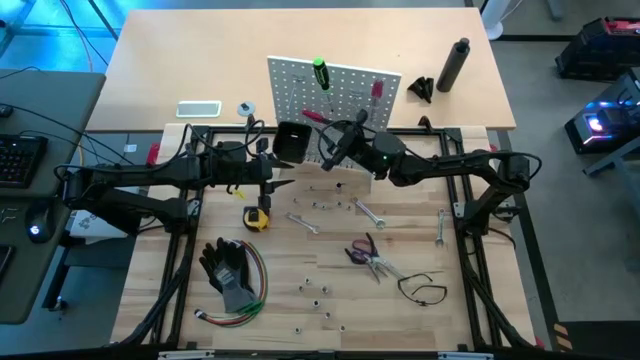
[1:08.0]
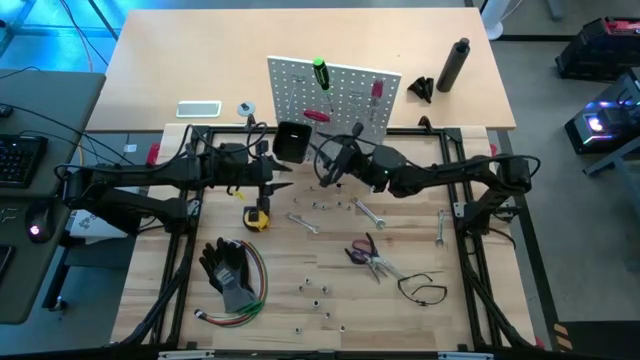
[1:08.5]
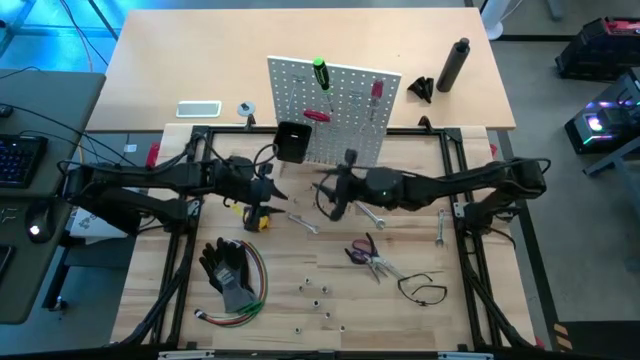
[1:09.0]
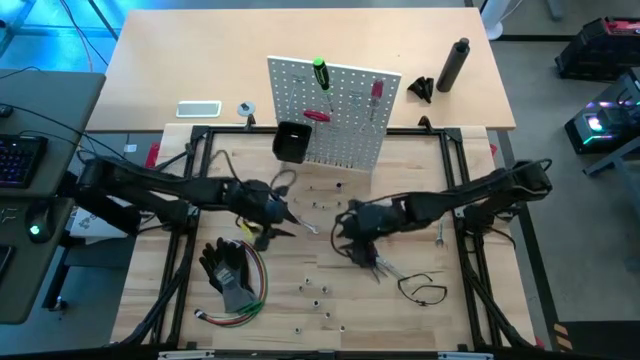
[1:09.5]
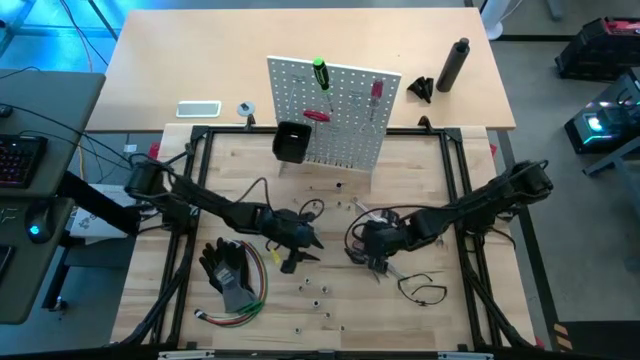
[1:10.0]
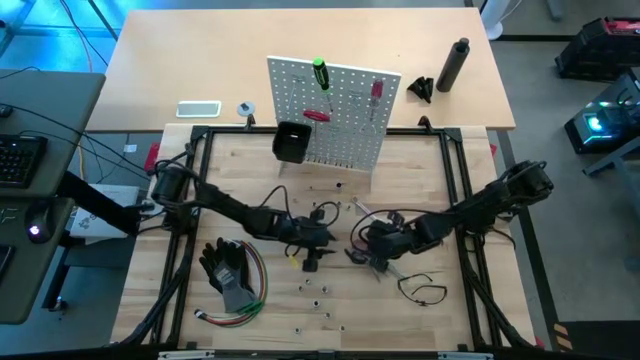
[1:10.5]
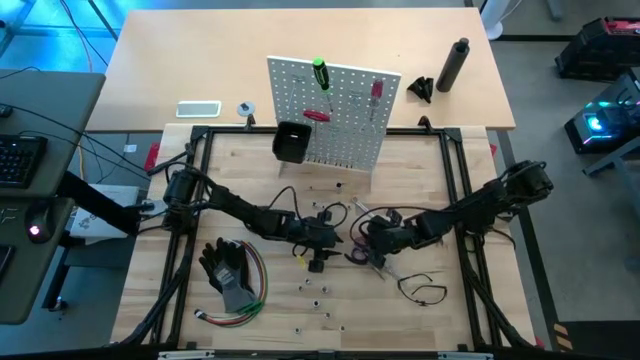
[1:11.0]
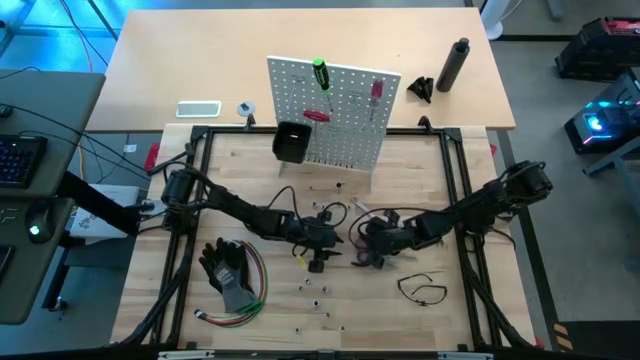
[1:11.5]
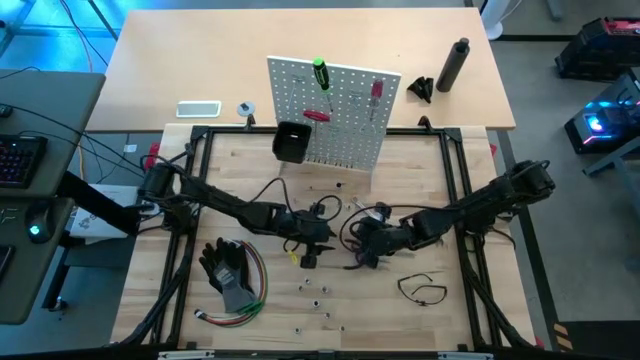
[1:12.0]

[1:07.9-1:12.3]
Task: Hang tools onto peg board
Hang the black pliers on the white peg board

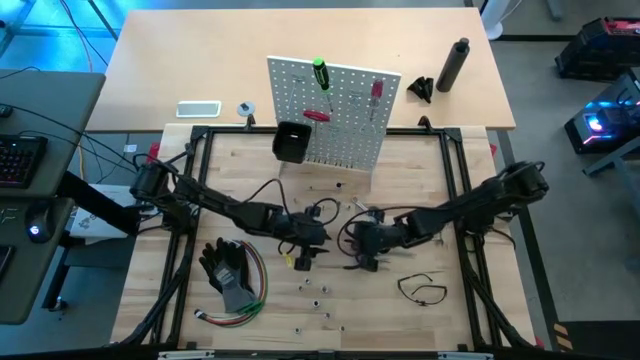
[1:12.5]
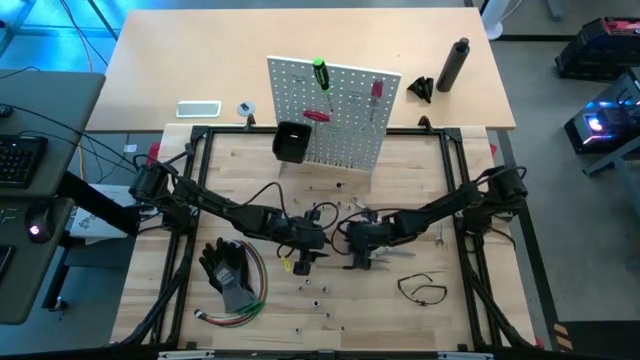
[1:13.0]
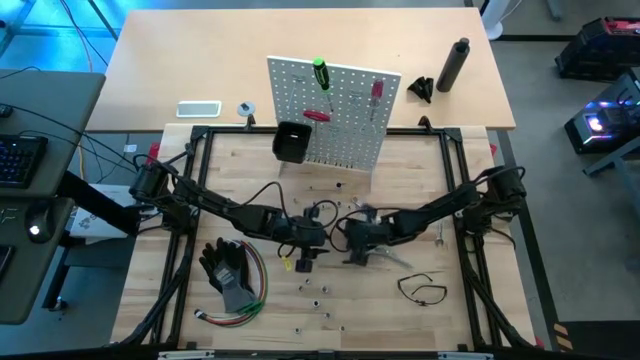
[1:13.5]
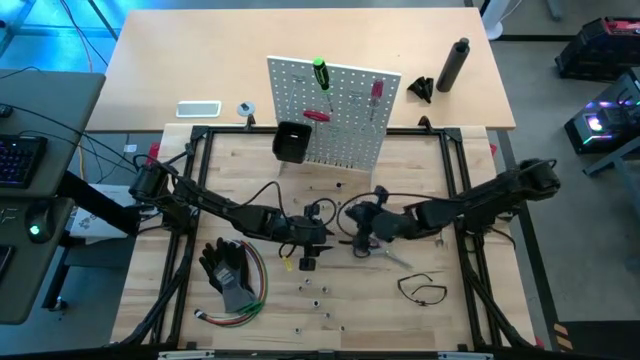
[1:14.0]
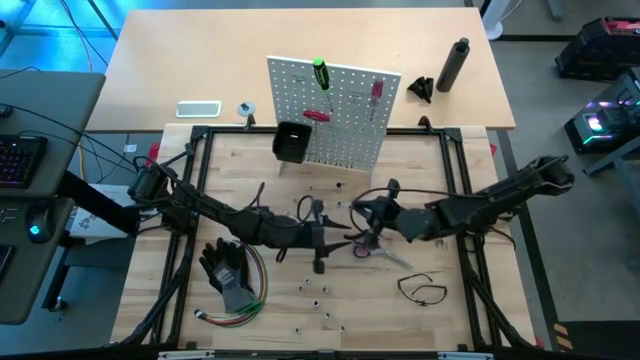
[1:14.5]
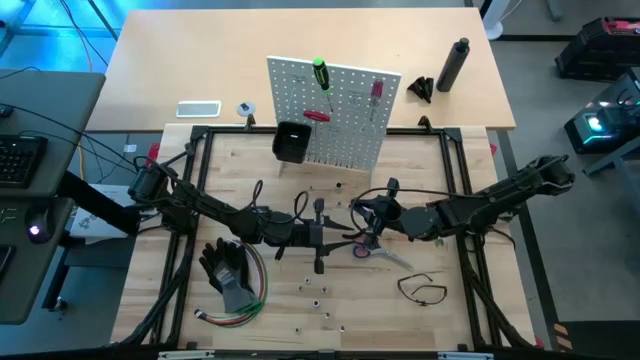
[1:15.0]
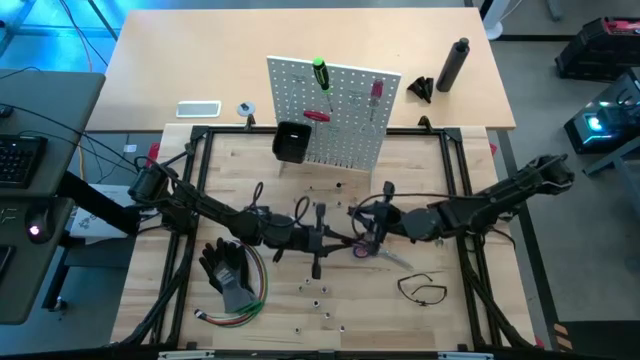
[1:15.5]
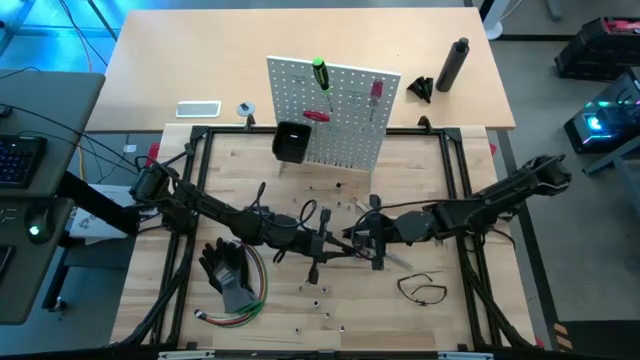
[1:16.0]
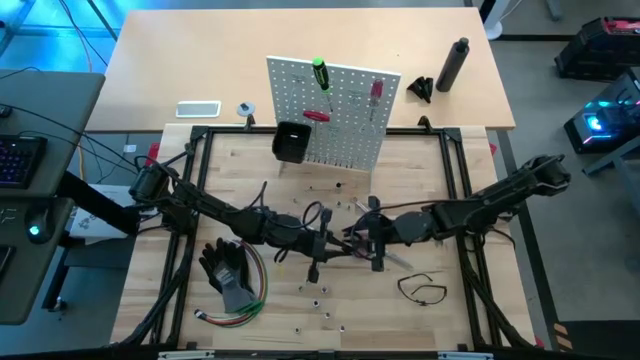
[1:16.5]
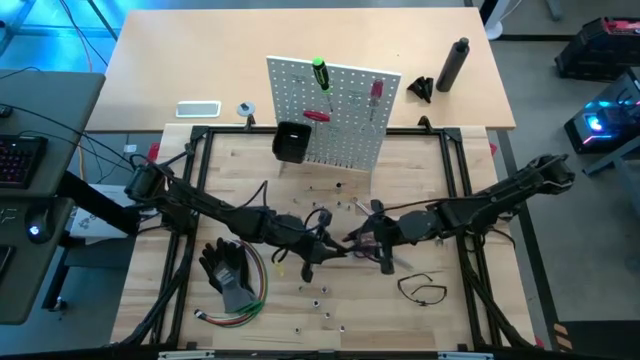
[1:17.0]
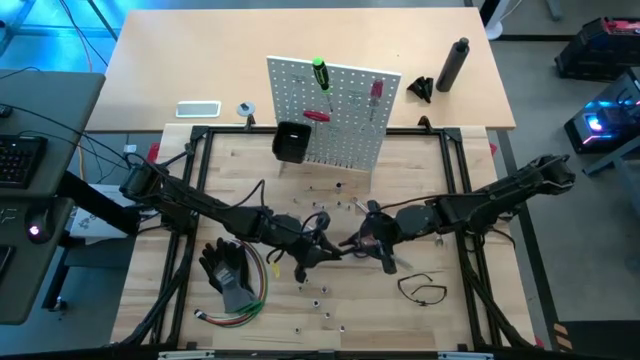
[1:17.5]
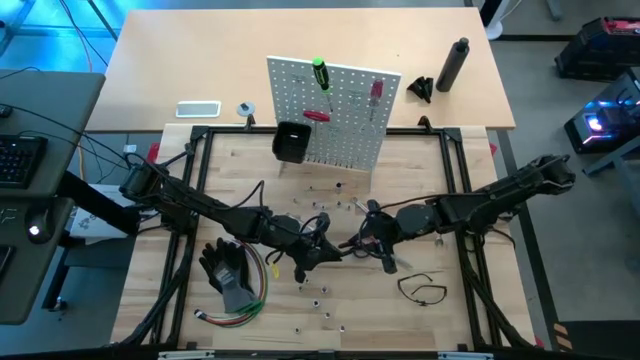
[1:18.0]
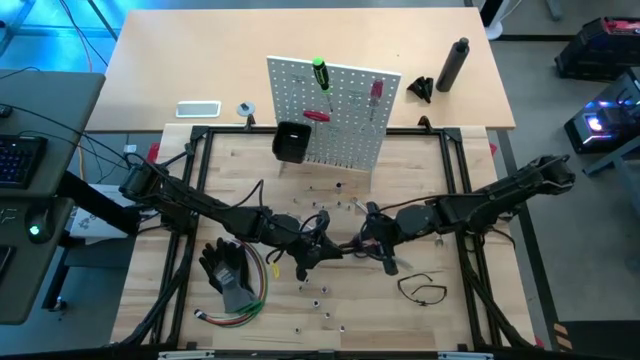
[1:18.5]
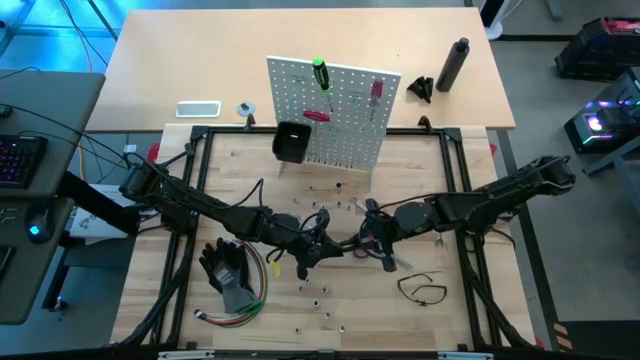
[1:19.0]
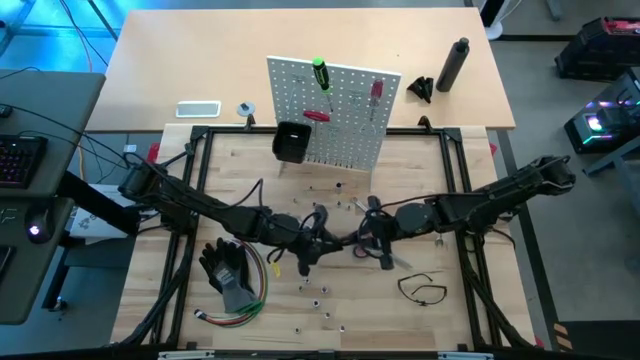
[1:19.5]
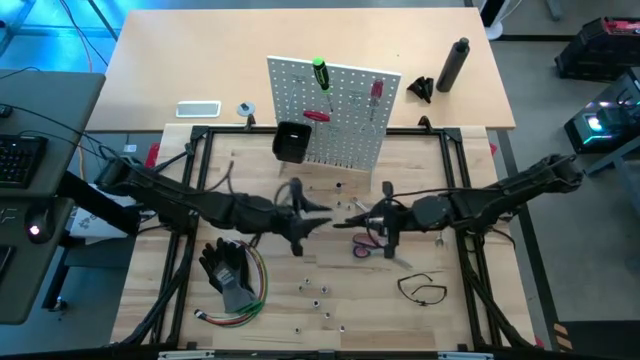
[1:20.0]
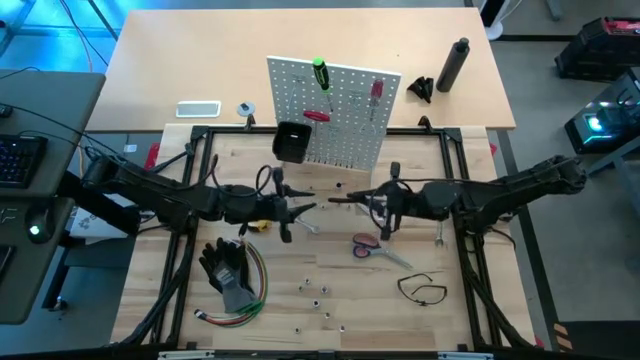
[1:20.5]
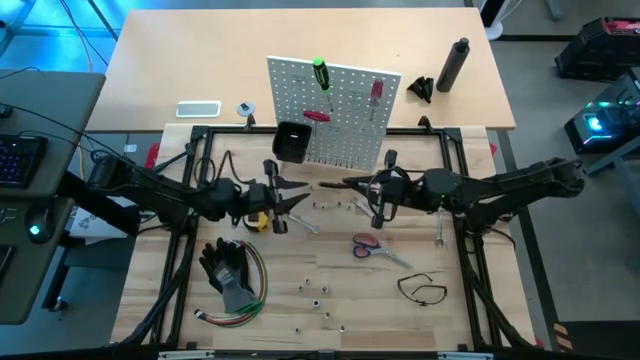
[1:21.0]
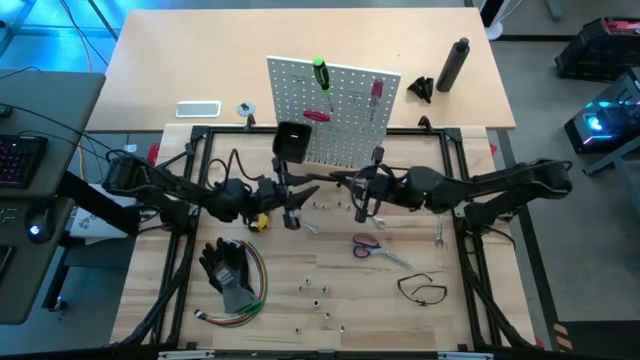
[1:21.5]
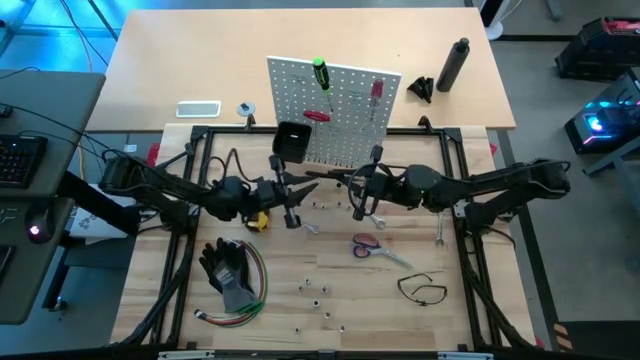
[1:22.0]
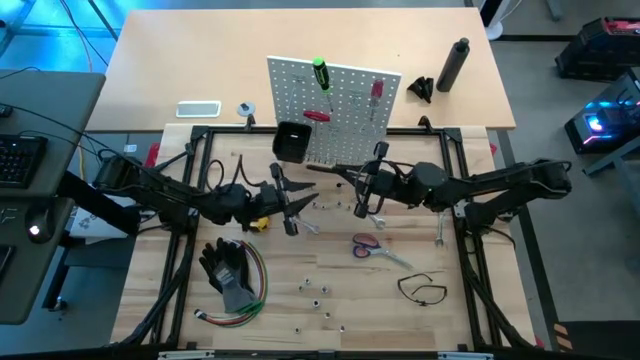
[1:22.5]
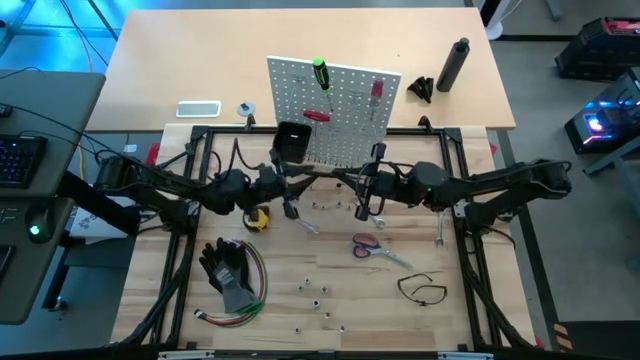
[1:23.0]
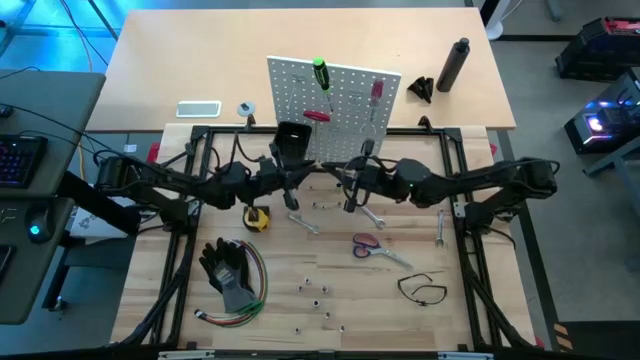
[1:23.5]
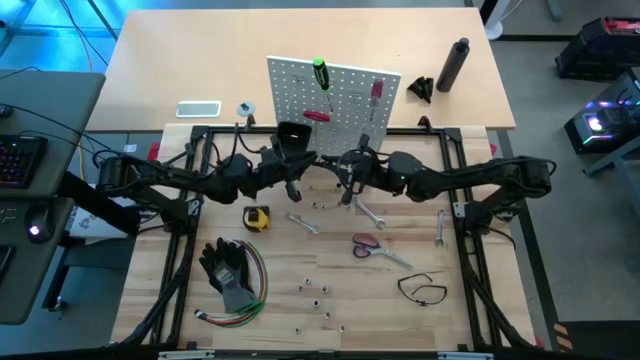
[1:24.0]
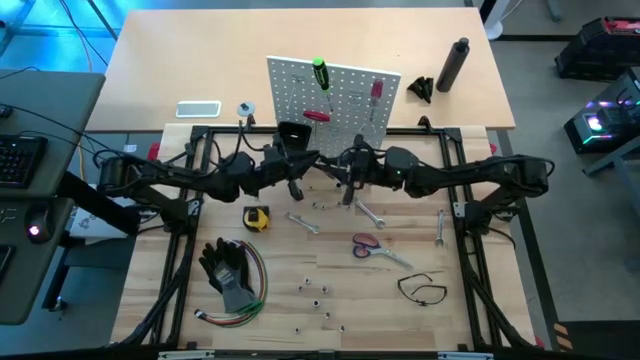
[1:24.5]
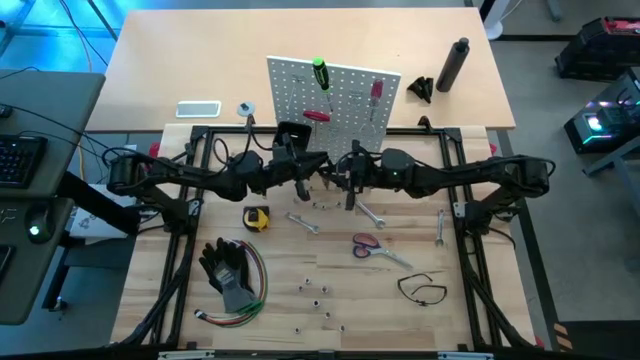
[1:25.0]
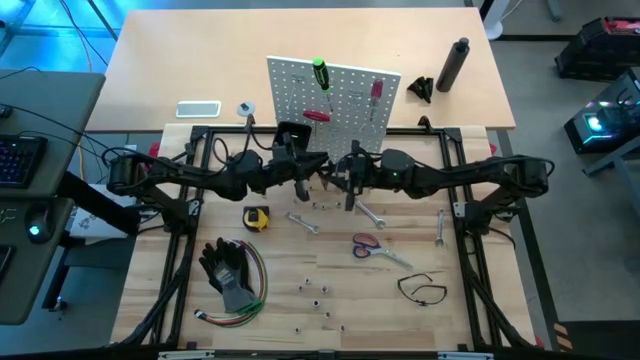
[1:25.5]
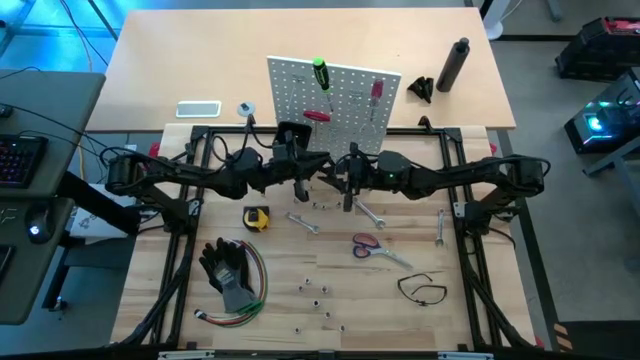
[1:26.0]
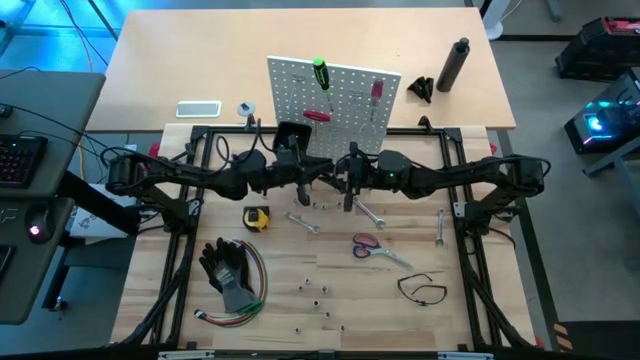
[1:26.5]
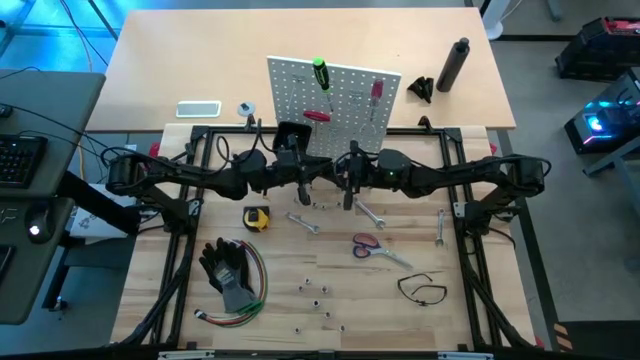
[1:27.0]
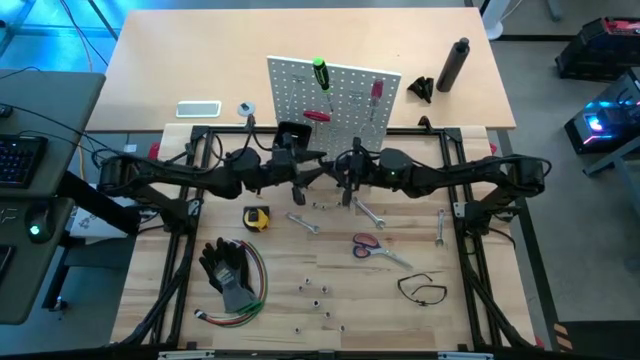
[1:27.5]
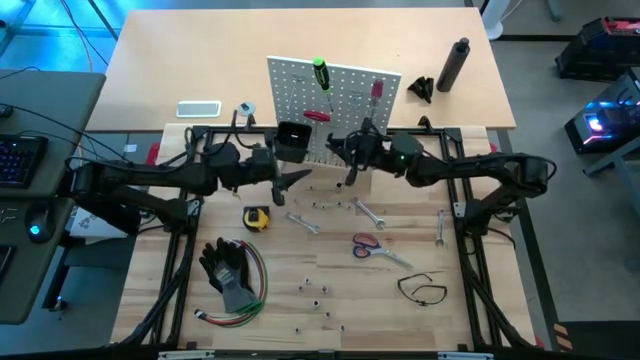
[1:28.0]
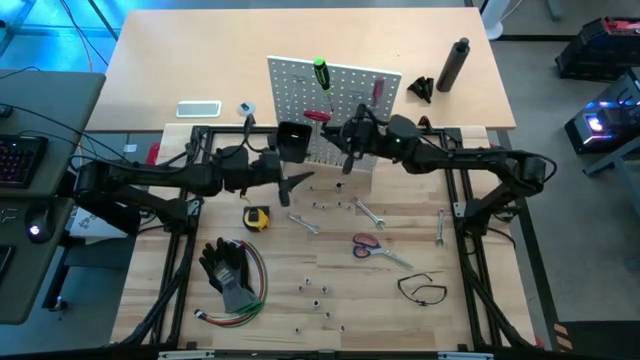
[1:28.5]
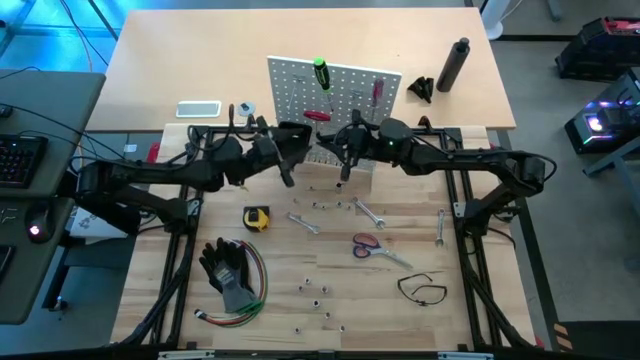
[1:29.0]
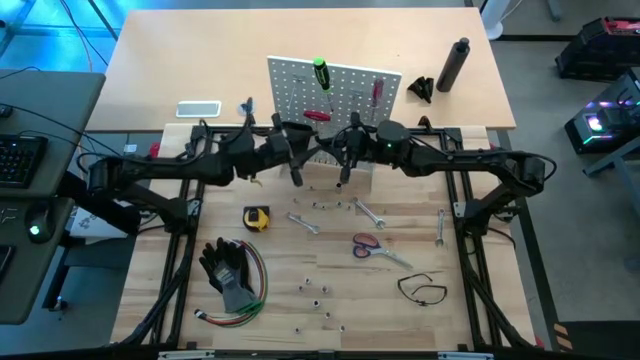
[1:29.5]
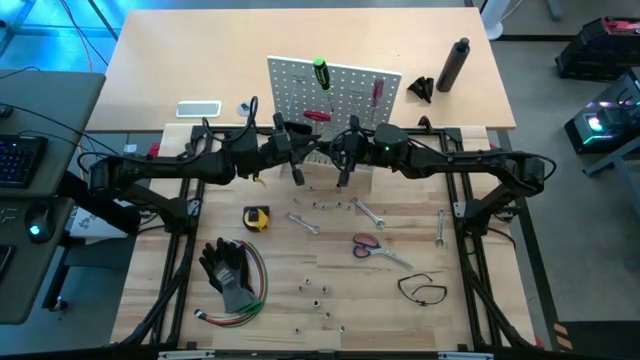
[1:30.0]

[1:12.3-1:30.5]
Hang the black pliers on the white peg board
